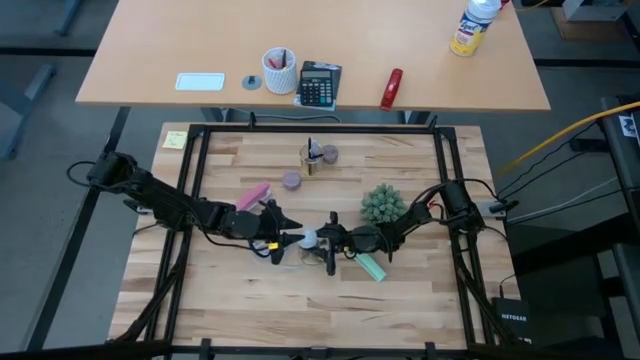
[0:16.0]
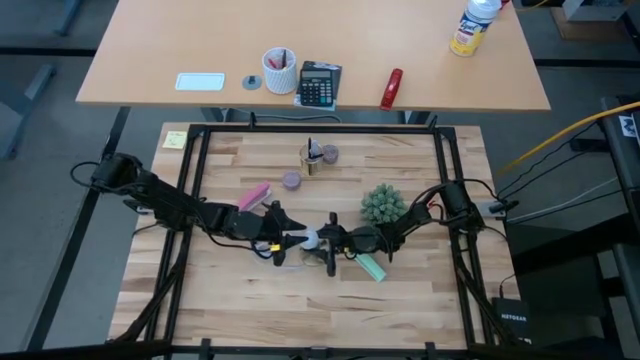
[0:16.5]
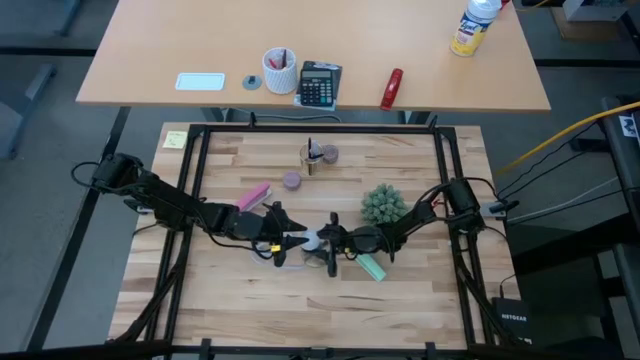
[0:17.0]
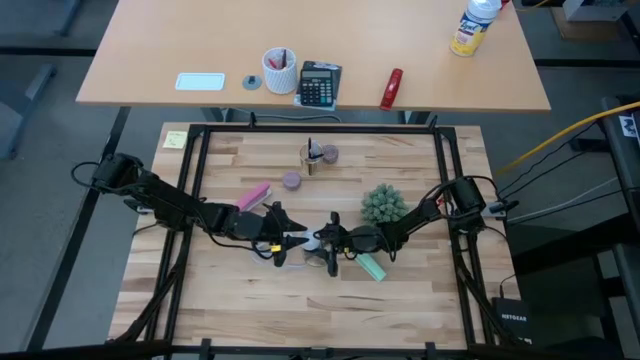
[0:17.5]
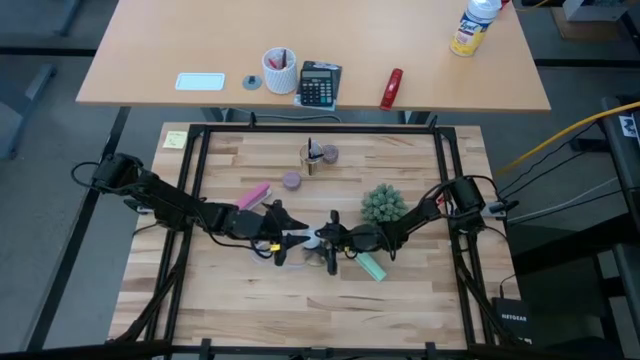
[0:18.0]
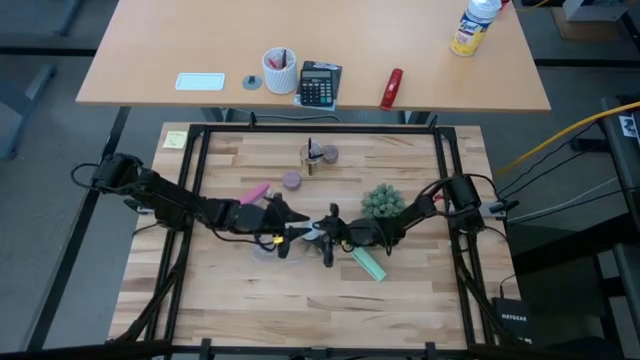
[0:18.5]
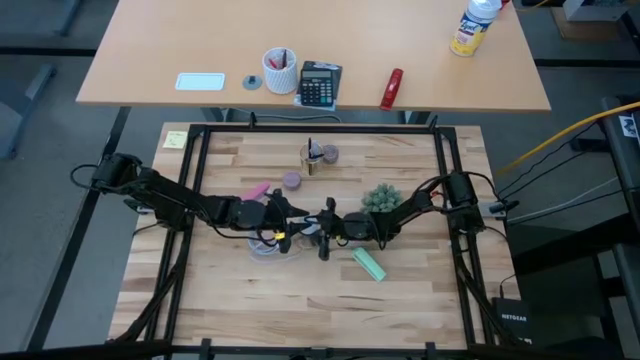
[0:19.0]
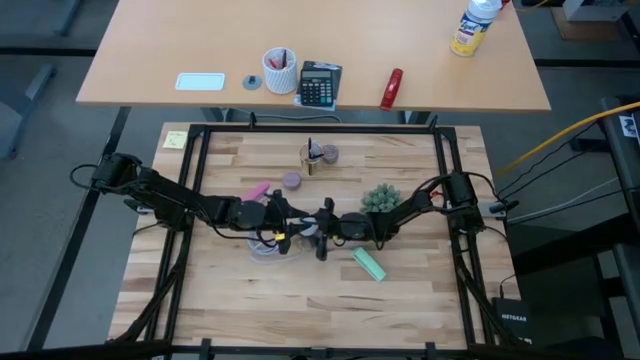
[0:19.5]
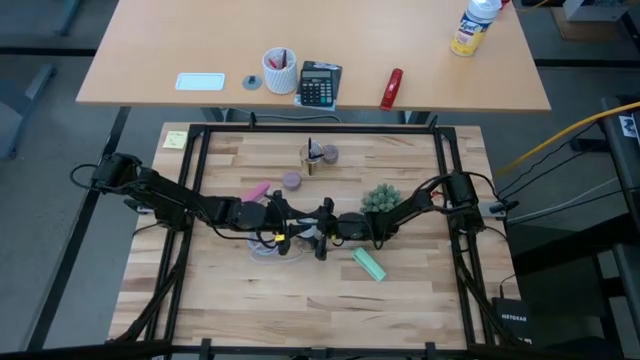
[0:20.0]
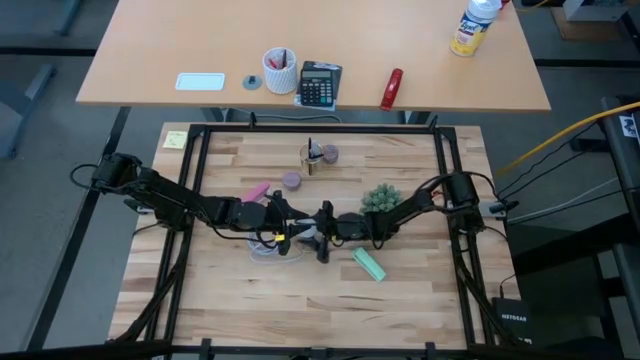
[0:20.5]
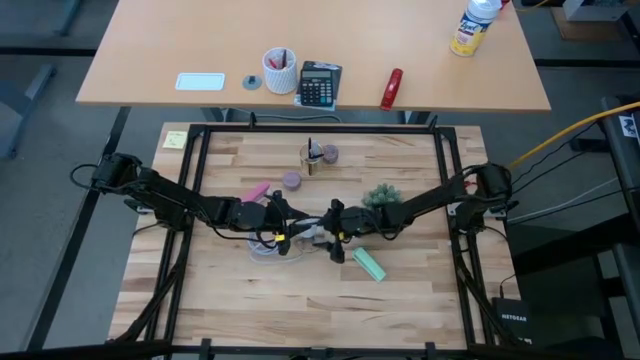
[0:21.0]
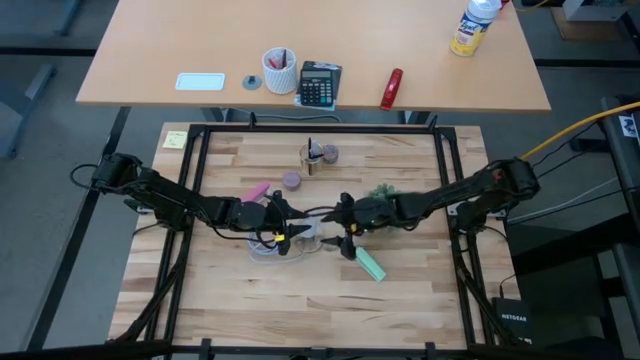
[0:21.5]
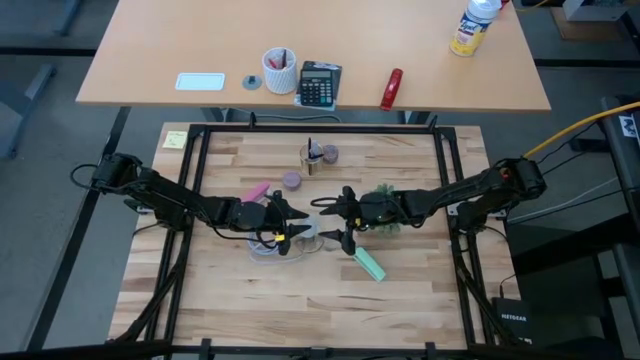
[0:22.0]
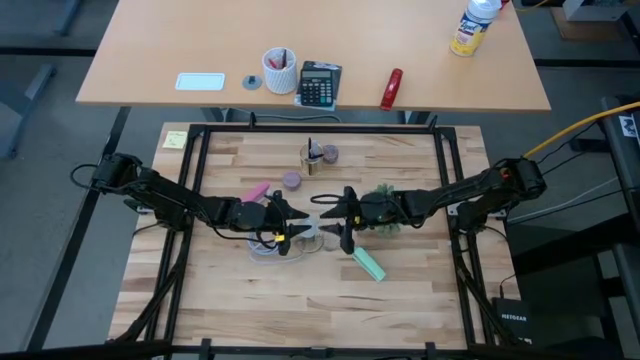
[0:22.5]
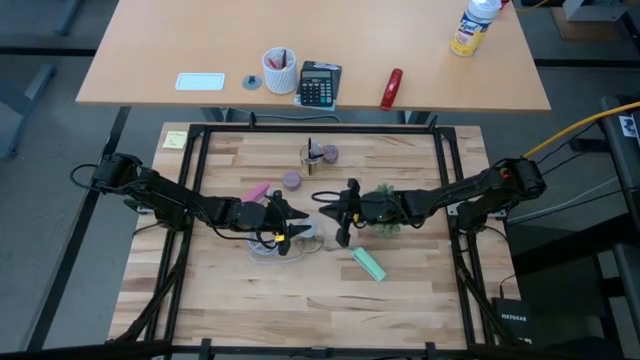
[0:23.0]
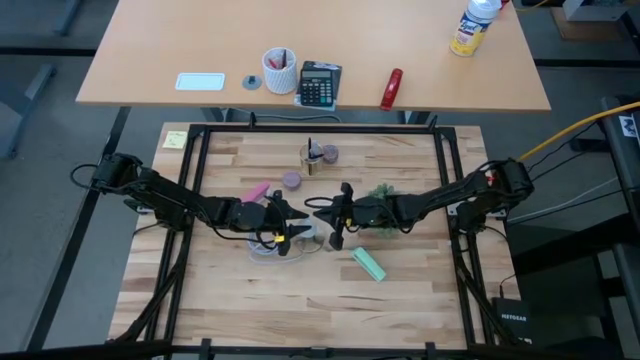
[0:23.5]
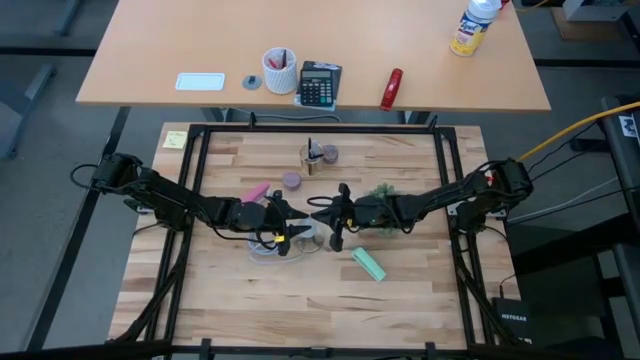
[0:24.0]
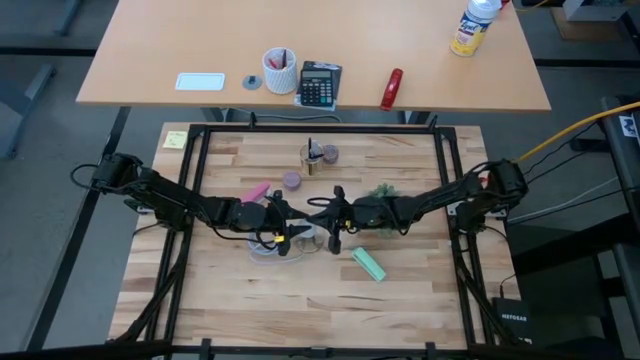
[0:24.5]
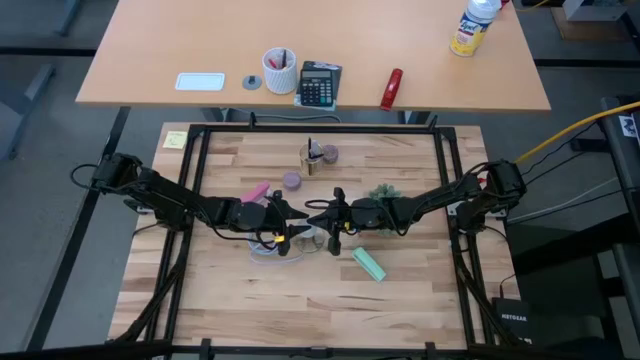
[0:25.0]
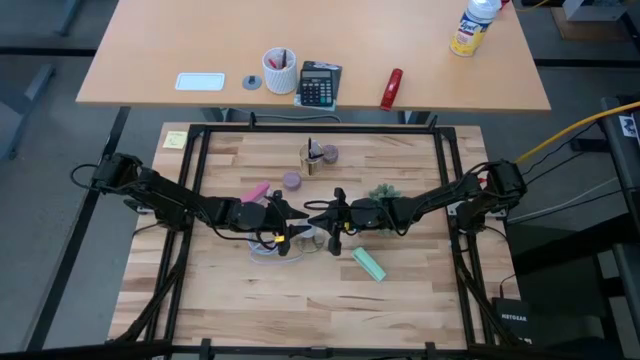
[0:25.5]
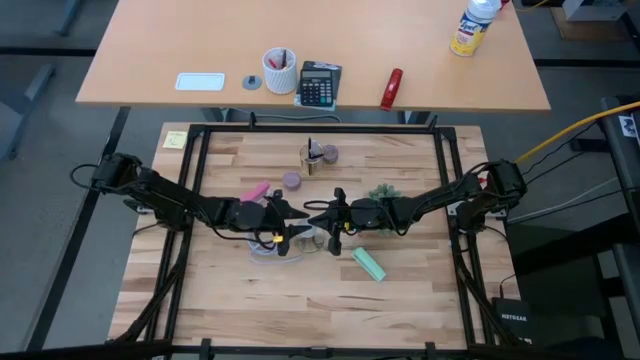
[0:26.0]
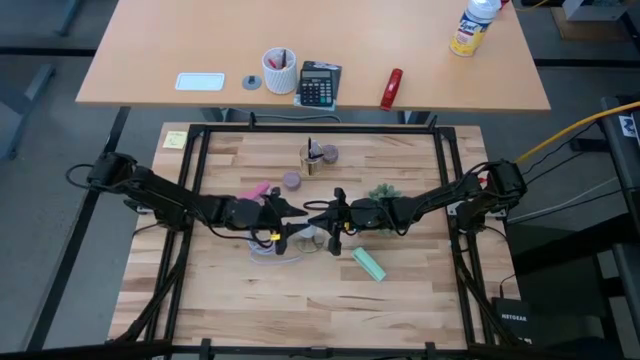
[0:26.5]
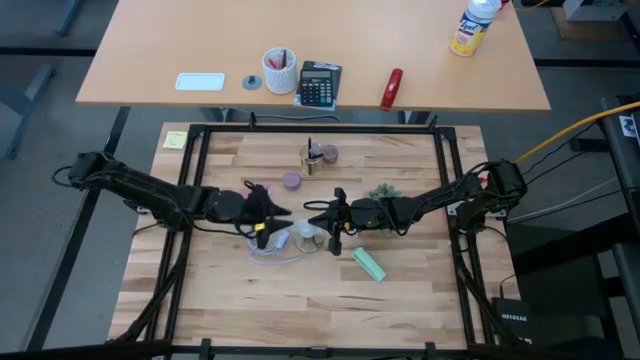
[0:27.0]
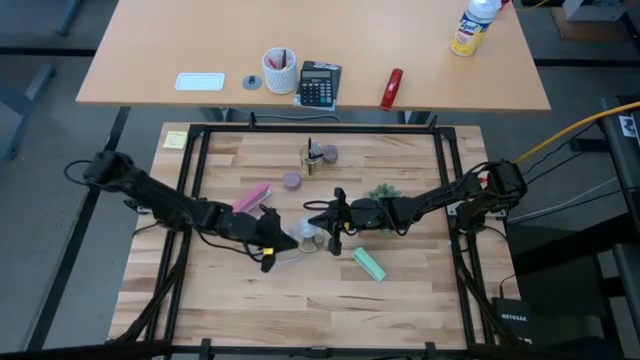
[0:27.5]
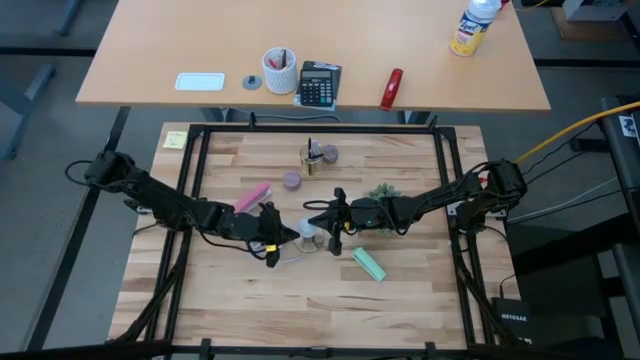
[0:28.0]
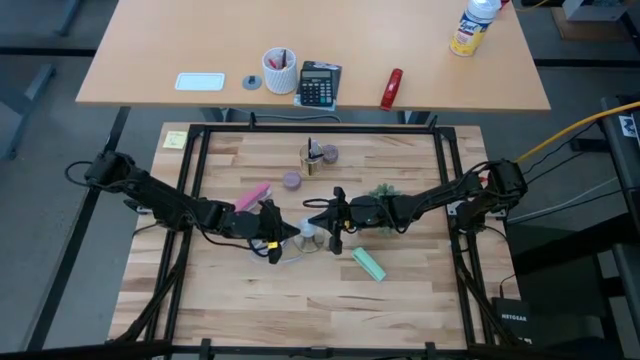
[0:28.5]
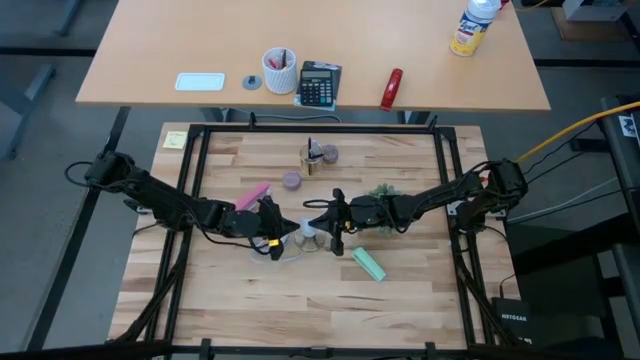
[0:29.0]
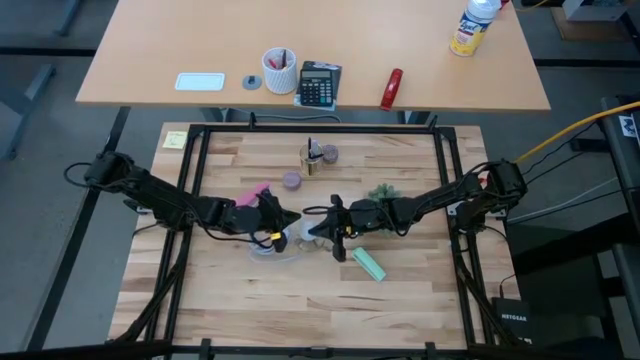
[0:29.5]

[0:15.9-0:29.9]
Task: Screw lightbulb
Insert the lightbulb into the lamp

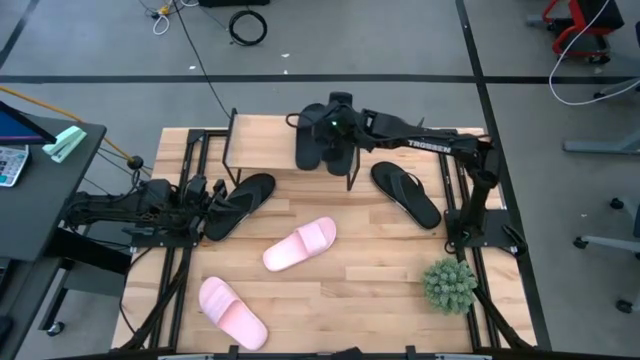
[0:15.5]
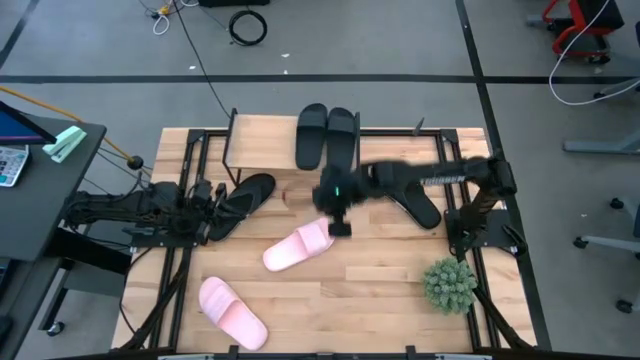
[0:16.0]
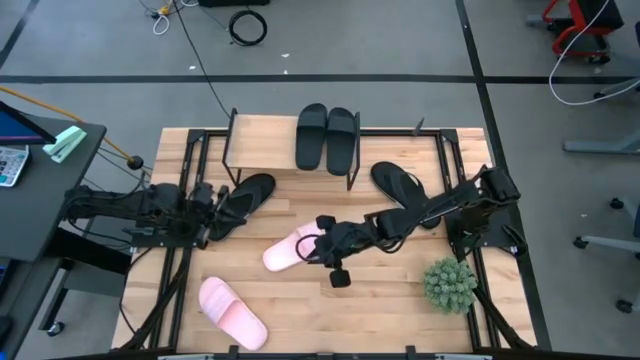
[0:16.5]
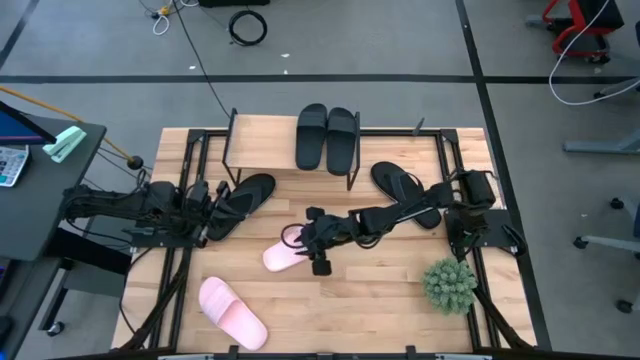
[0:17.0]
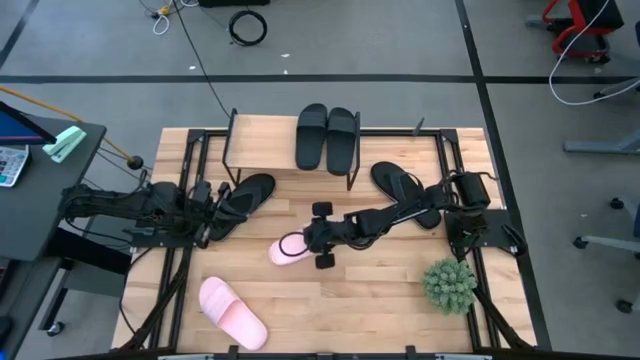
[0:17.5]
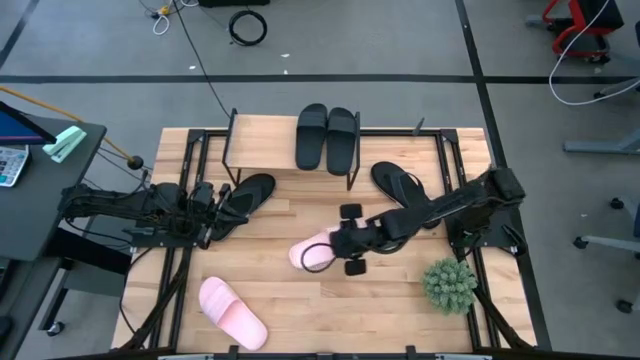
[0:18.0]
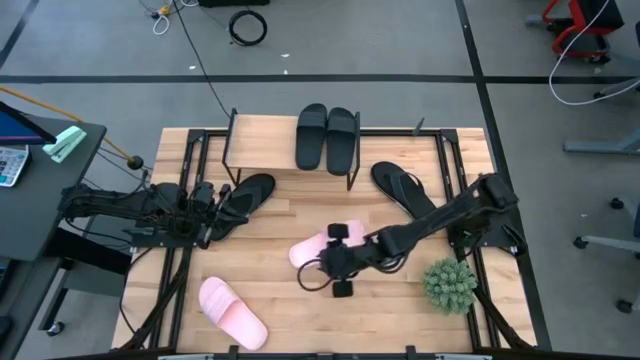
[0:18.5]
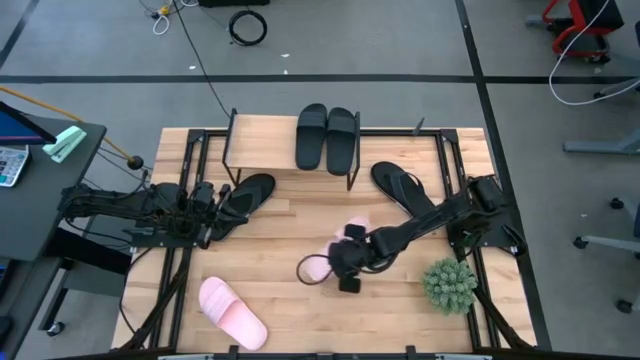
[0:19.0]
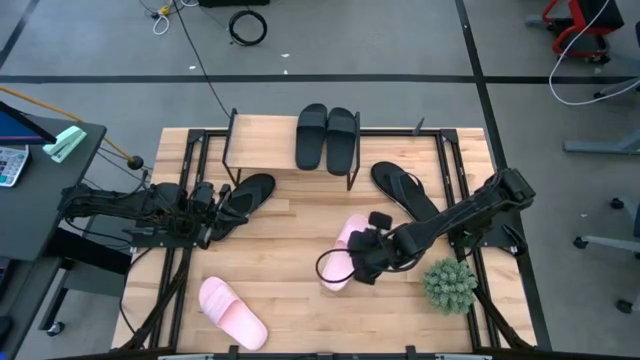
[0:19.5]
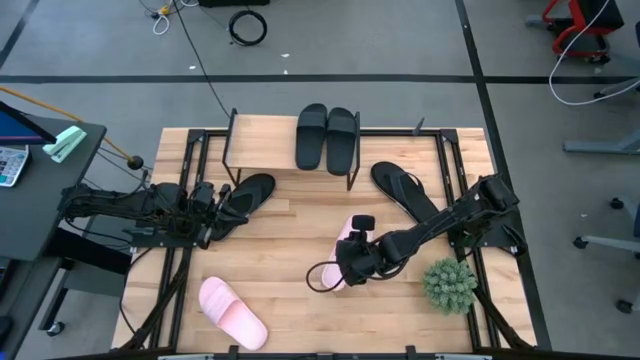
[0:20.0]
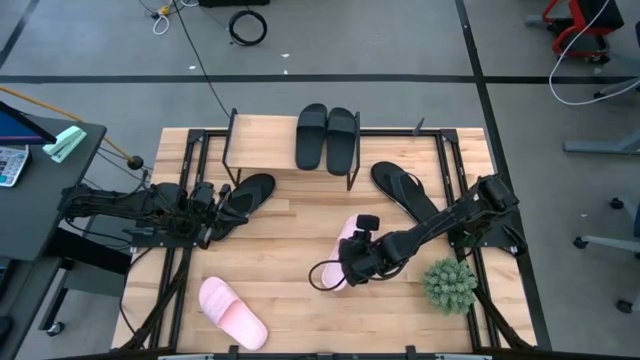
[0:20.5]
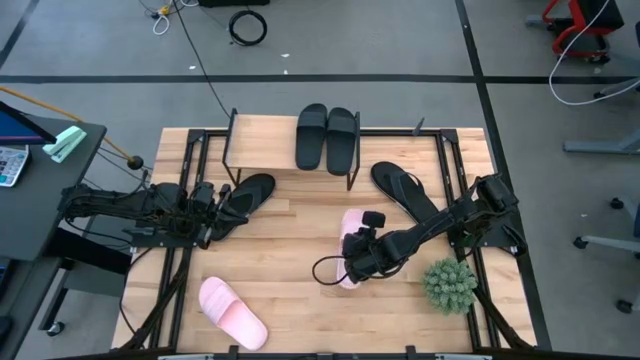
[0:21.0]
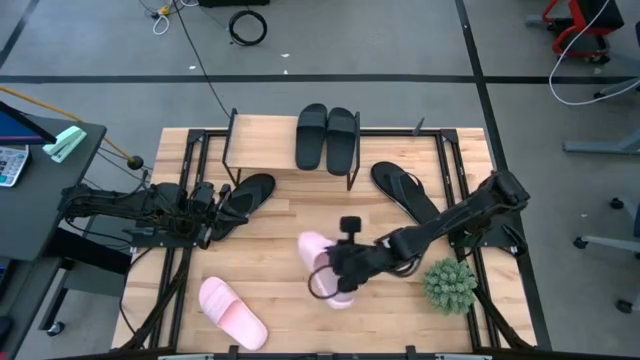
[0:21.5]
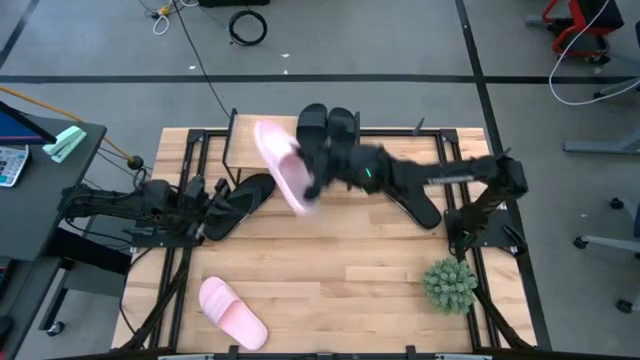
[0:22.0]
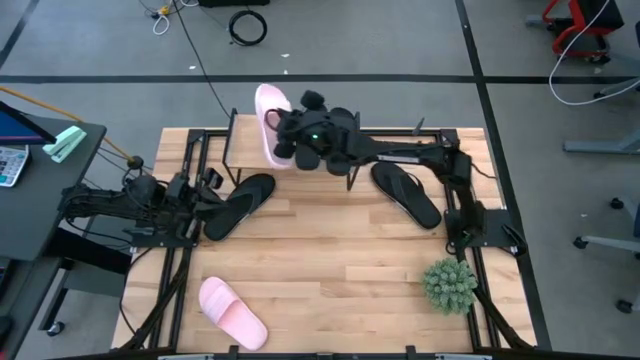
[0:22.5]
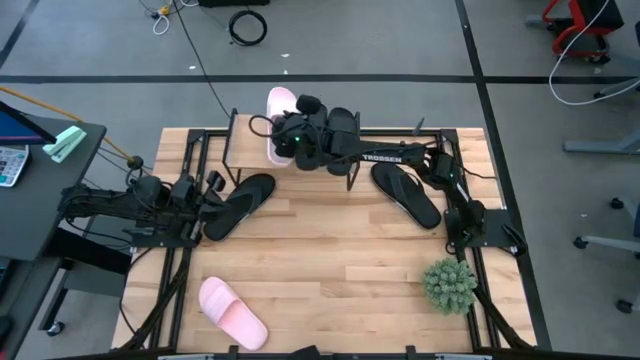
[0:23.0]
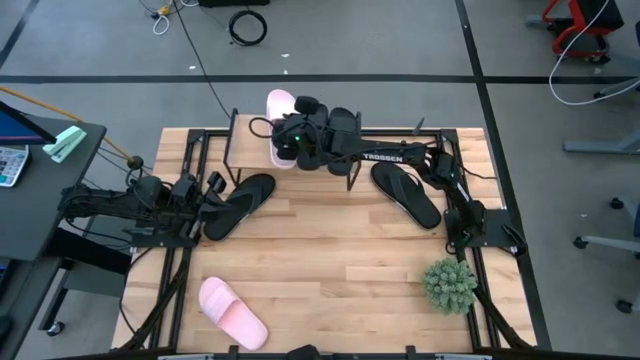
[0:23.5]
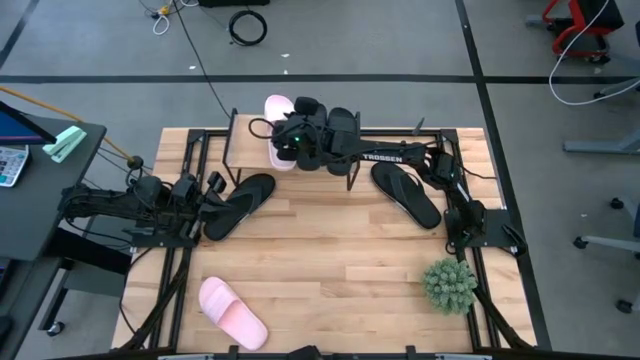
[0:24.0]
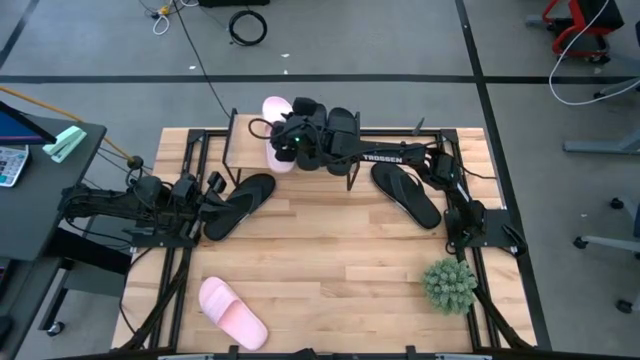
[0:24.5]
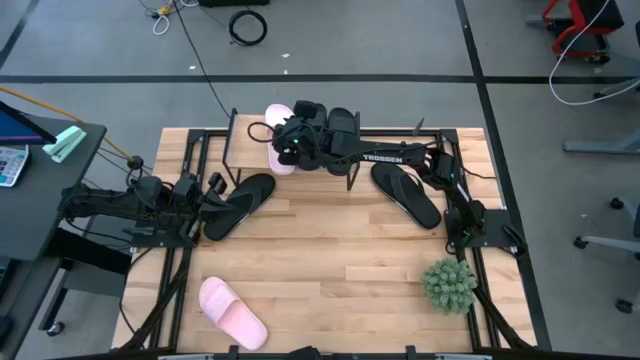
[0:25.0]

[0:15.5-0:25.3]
Task: Pick and place slides into the shelf
Put the pink slipper on the shelf
